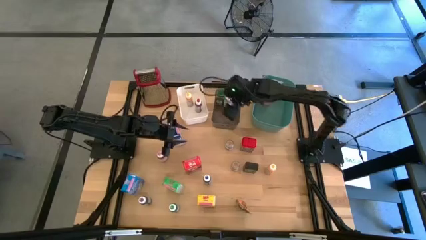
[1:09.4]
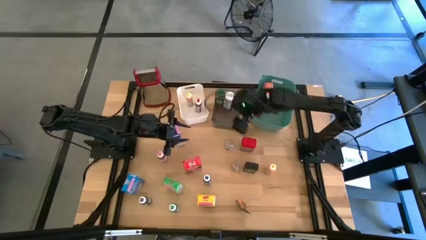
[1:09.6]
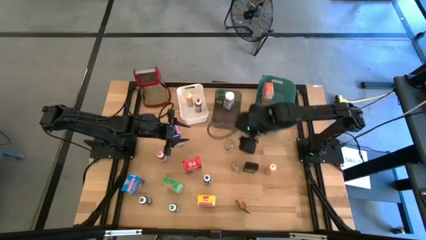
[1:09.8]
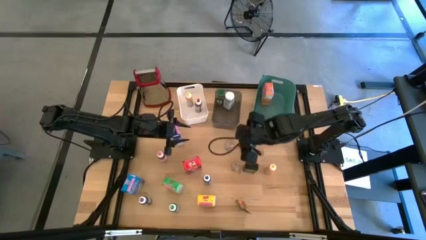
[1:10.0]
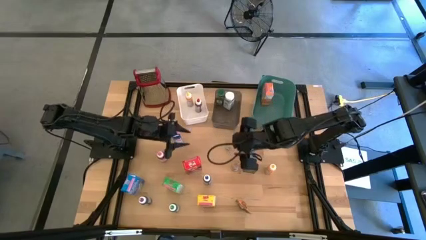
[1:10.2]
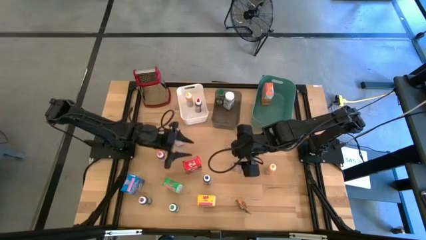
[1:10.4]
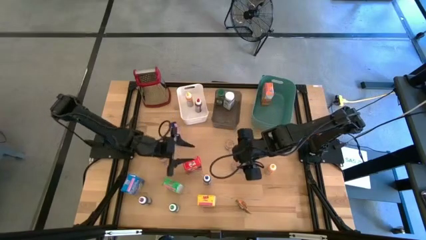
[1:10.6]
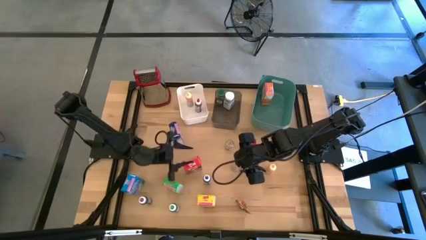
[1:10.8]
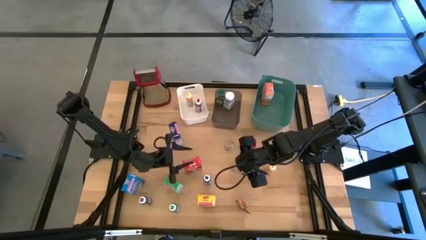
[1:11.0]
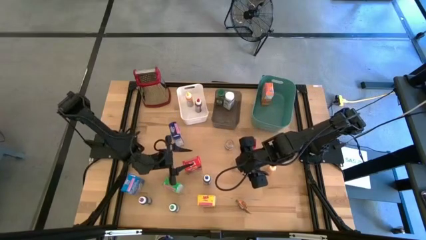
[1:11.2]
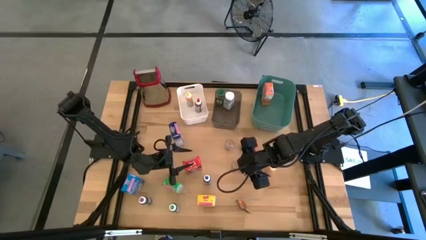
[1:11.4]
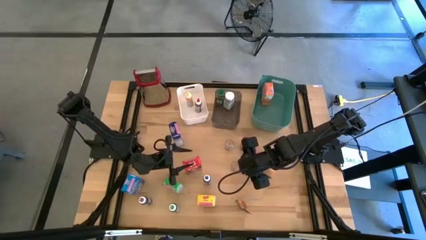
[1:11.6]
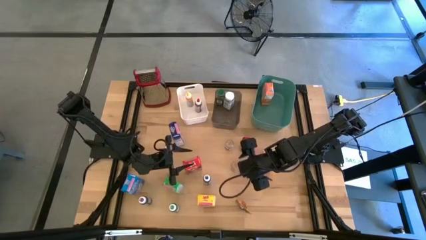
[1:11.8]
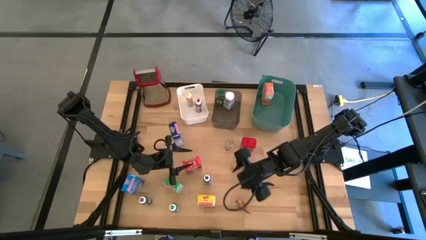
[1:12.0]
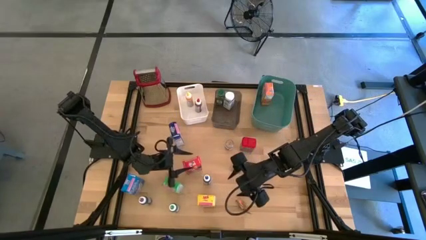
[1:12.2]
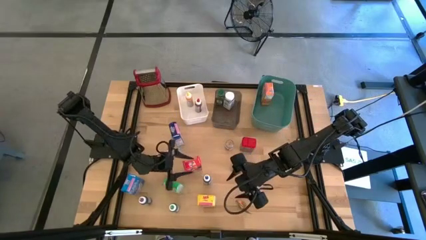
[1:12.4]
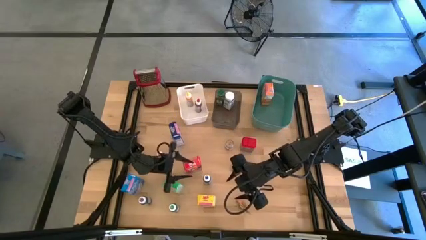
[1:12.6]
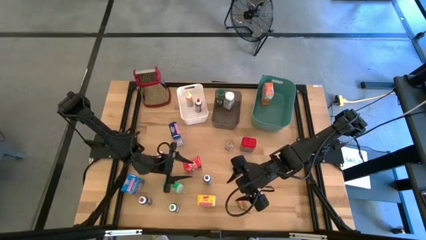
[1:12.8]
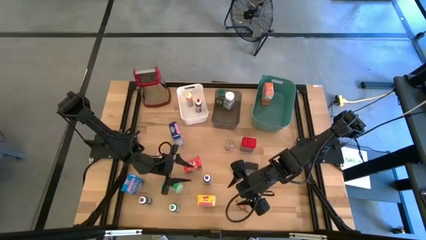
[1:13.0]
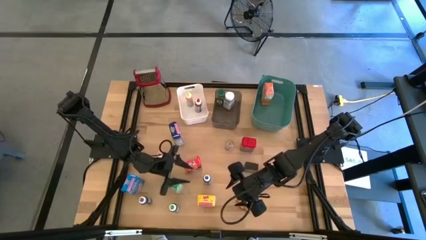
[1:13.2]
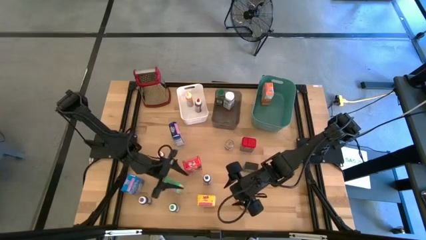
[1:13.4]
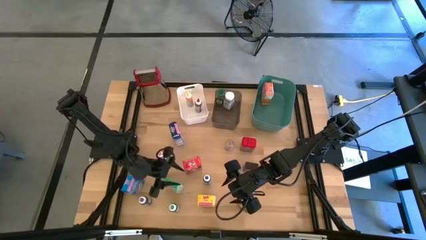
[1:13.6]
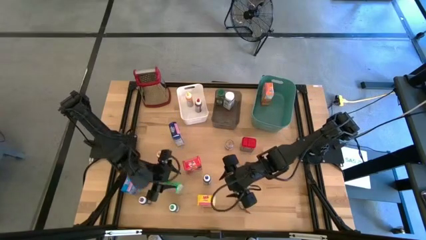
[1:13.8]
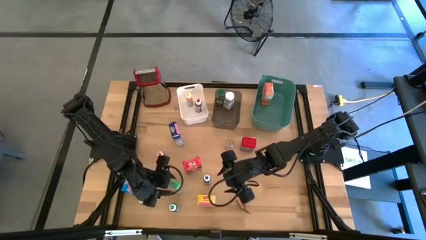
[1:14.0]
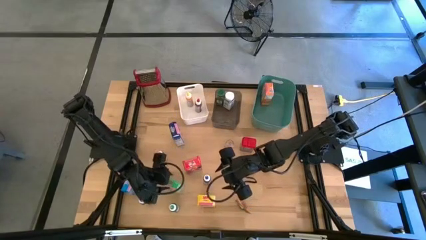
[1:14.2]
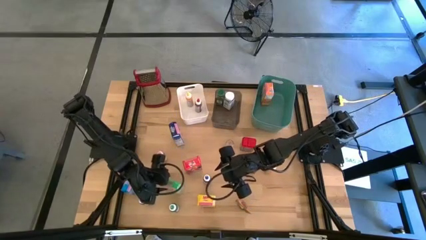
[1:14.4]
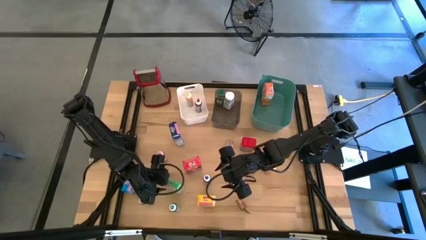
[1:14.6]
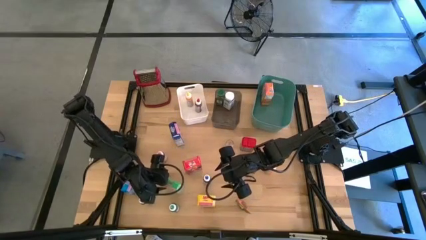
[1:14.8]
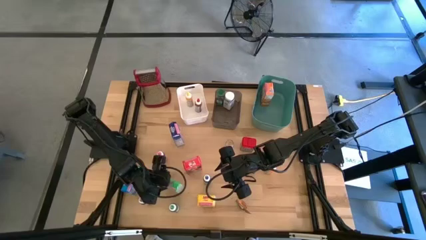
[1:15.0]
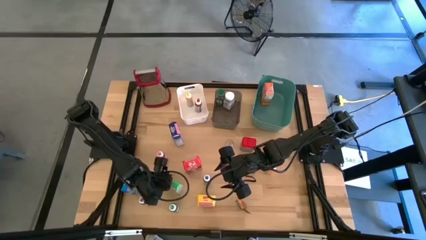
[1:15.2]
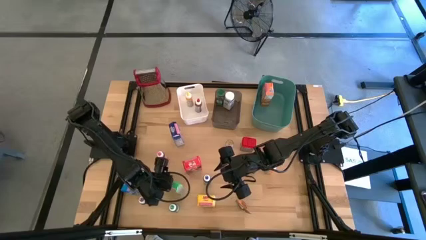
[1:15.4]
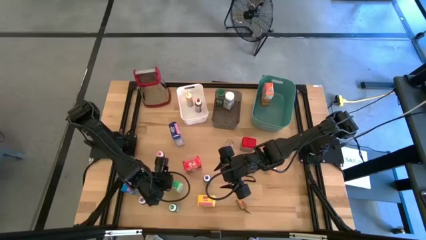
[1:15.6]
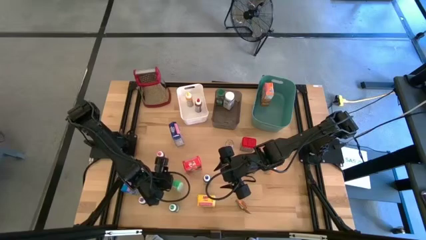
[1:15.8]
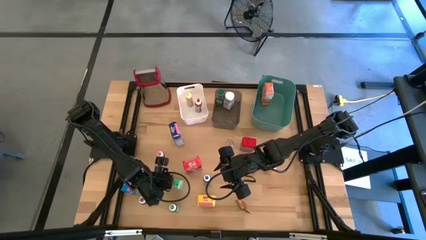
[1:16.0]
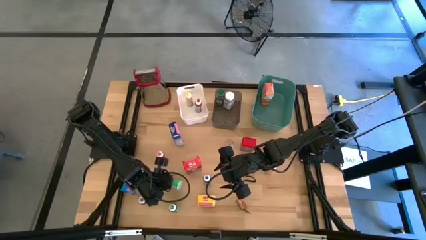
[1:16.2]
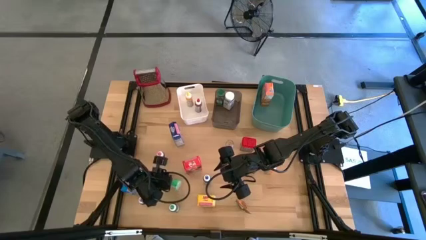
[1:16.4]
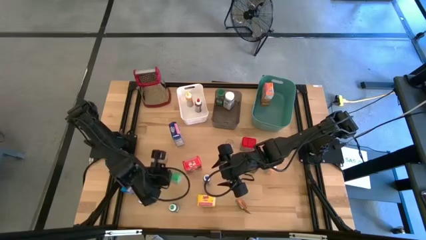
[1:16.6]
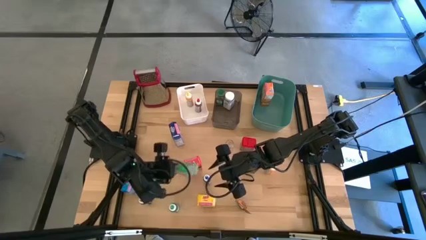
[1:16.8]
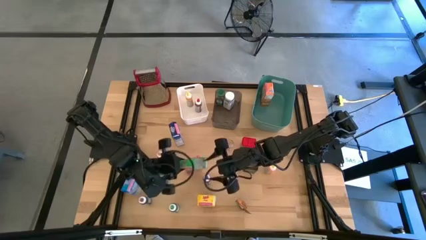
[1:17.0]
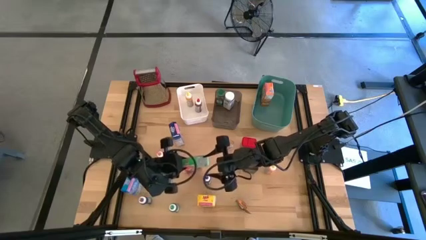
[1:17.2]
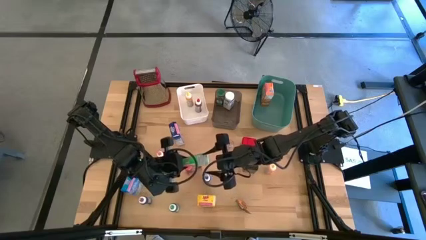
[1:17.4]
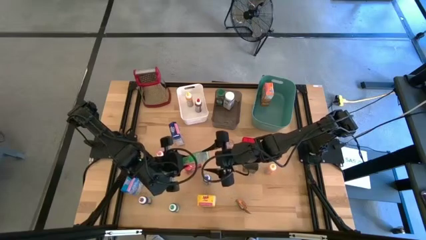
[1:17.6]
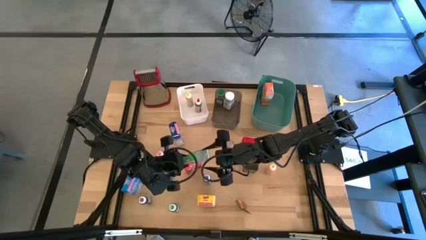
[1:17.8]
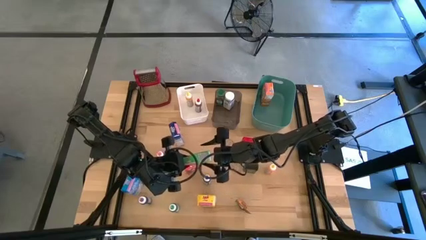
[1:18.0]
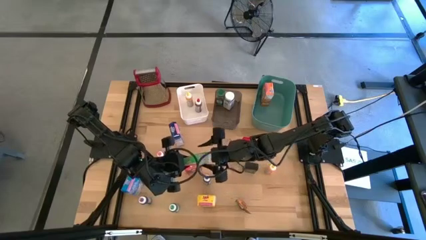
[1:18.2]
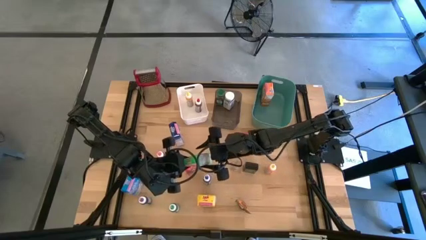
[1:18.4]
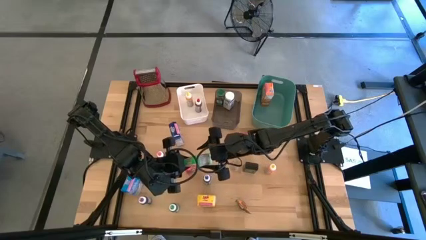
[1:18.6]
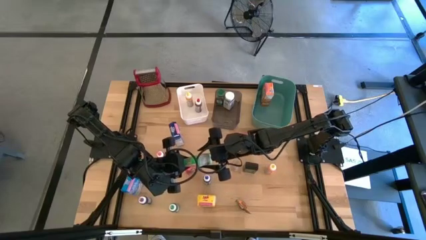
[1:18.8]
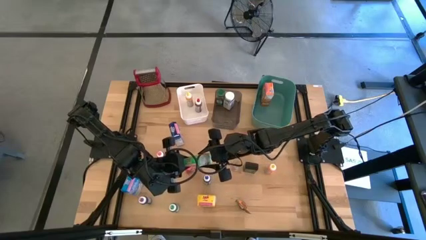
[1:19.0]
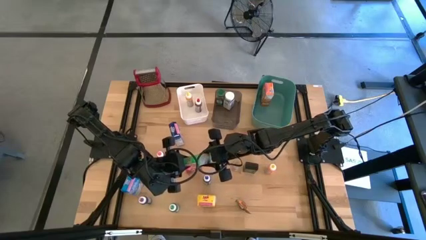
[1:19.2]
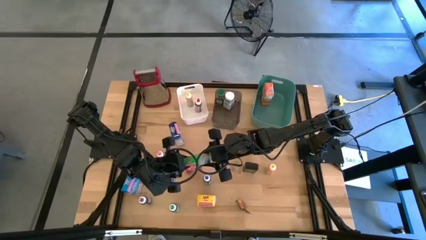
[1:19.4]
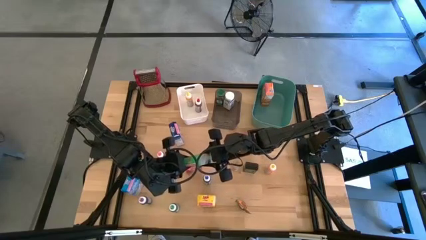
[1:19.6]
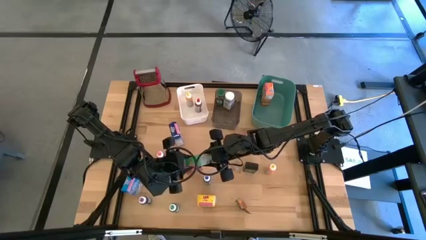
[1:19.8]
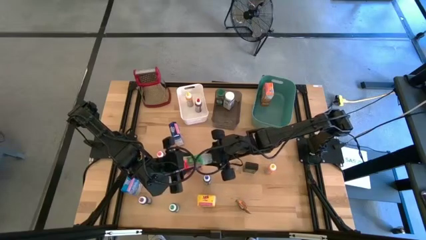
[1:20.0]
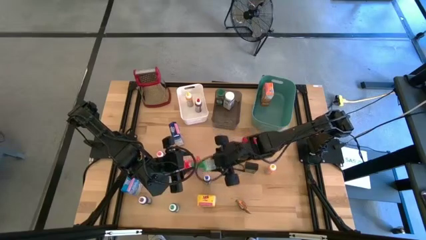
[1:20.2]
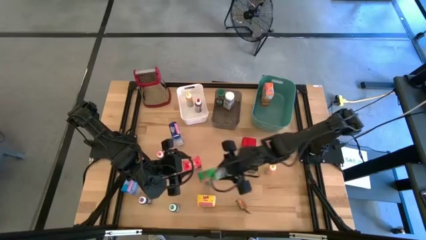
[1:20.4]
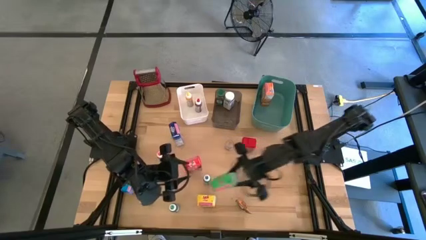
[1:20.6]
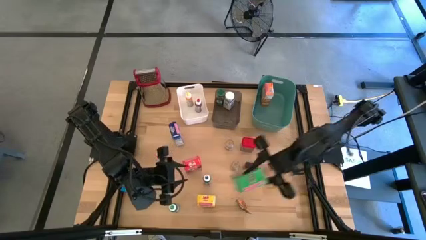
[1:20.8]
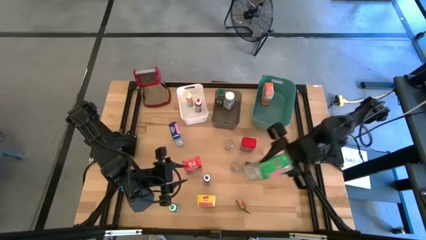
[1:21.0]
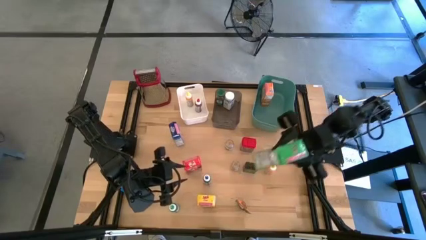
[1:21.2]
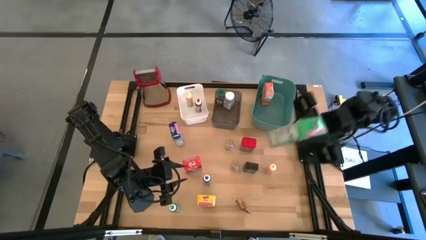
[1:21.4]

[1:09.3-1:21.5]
Task: Pick & Place Kitchen Items
Put the green cereal box into the green bin

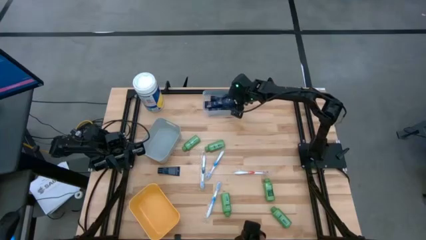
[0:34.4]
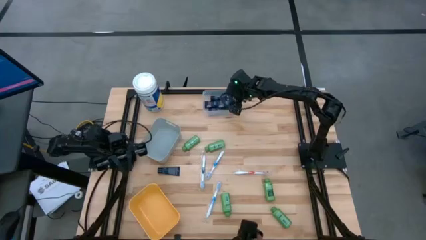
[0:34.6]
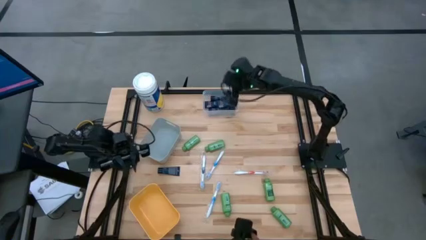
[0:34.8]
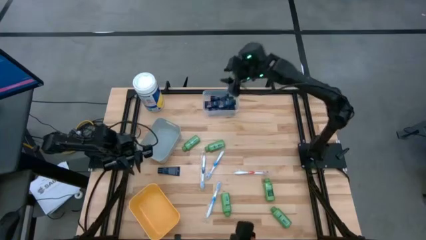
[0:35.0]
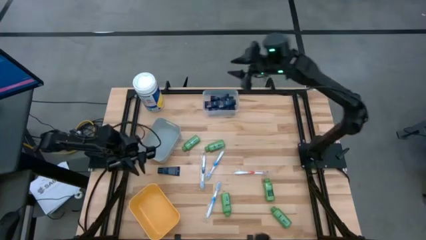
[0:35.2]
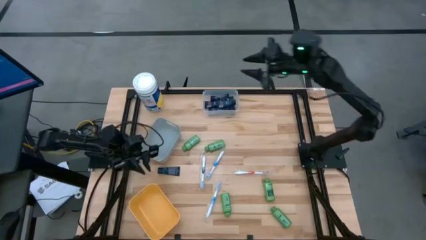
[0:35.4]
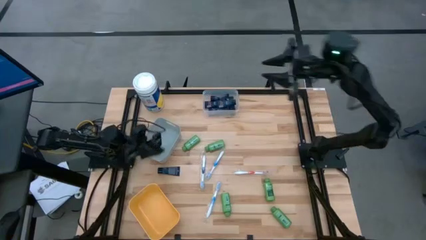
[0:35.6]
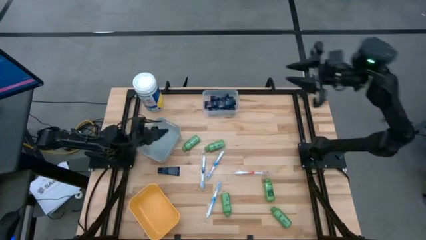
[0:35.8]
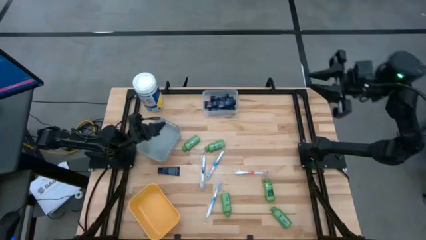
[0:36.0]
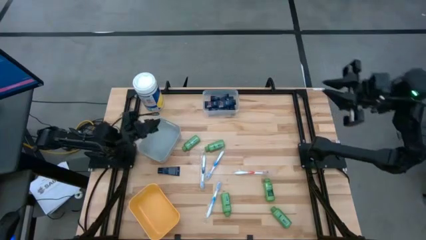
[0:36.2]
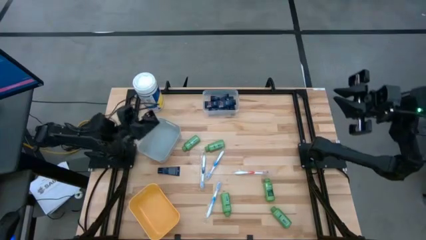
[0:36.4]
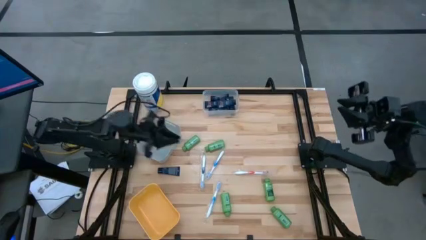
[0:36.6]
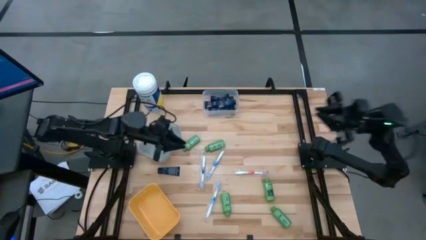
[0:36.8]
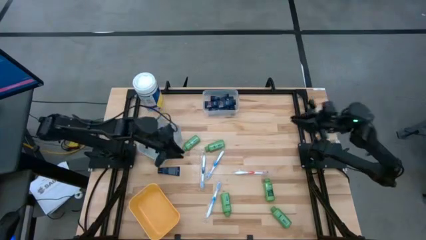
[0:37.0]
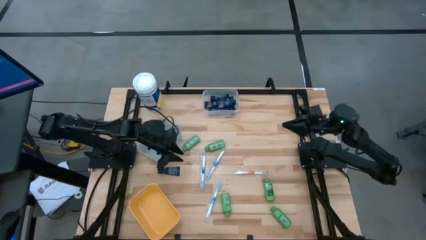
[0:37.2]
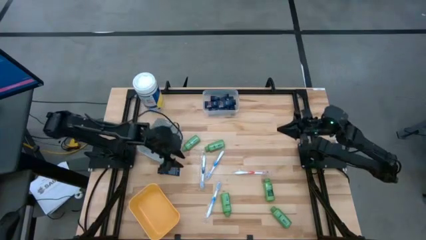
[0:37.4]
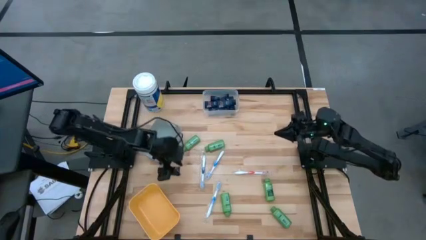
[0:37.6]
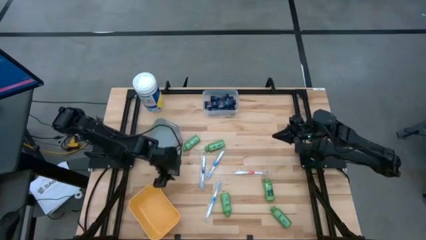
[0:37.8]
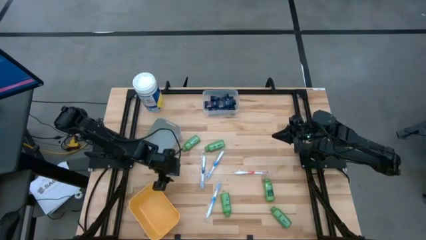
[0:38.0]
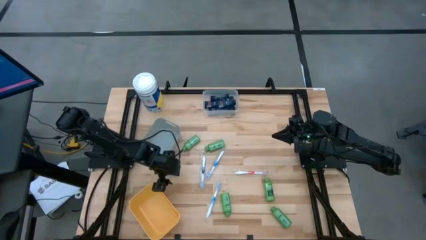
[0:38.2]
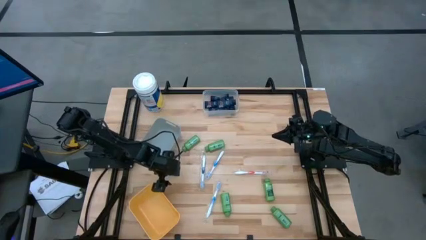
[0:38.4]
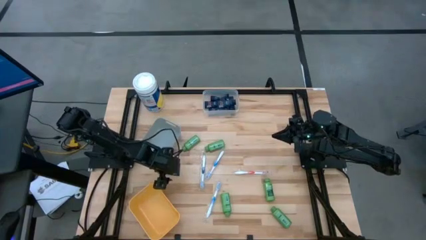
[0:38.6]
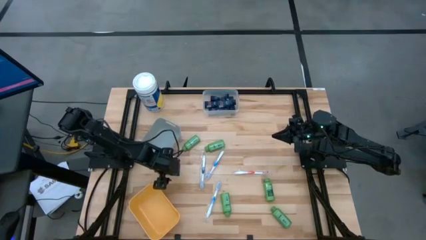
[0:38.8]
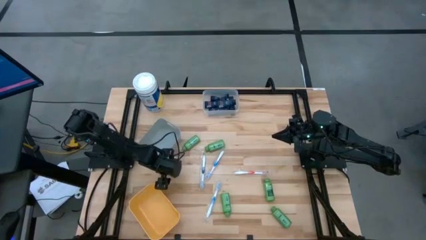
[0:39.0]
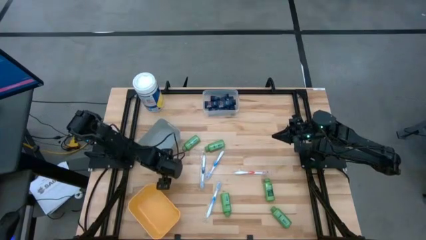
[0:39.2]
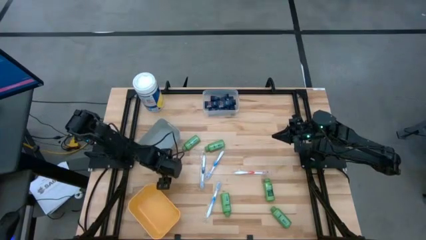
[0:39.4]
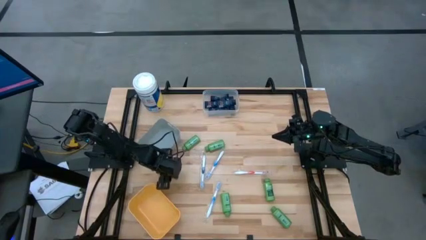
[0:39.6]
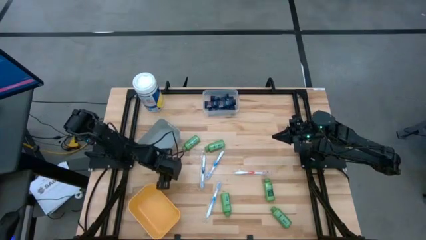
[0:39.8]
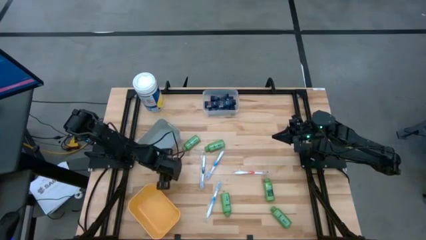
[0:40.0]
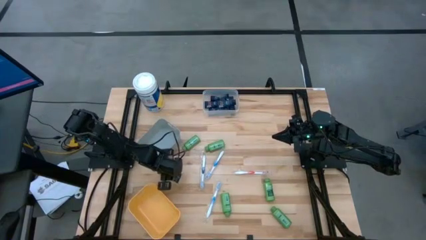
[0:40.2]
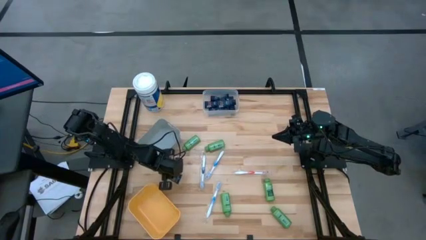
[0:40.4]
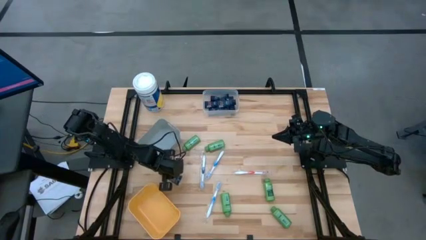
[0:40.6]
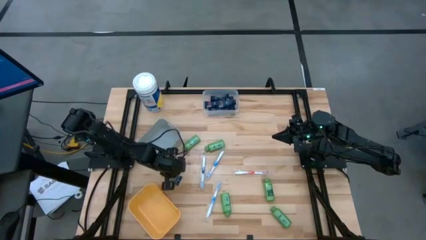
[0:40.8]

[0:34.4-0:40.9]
Task: Pick & Place Travel size toiletries
Put the blue shave cream into the transparent bin
